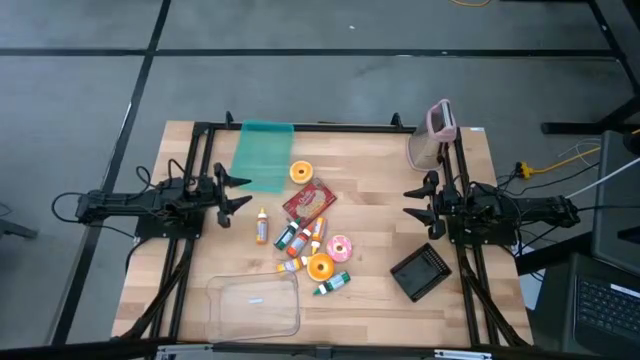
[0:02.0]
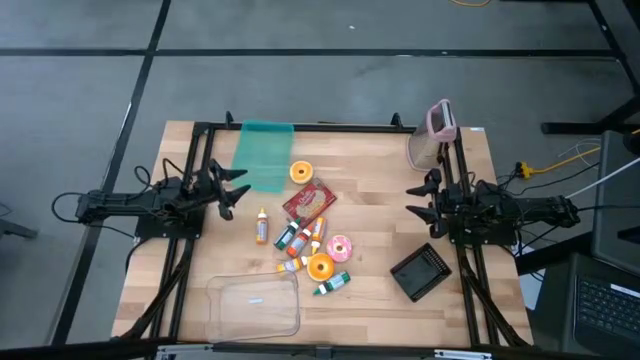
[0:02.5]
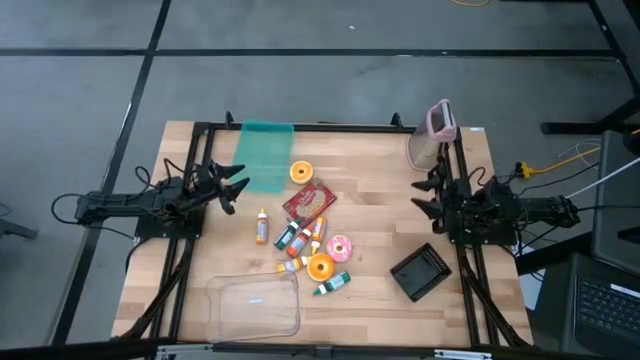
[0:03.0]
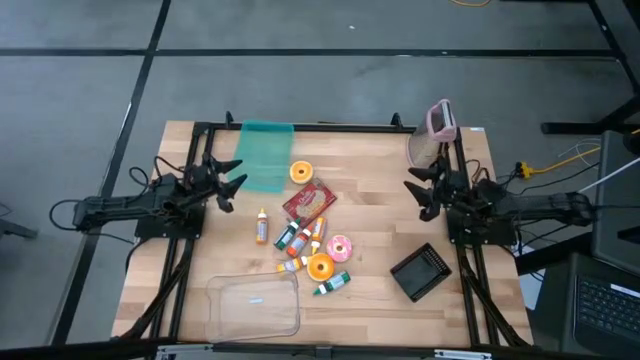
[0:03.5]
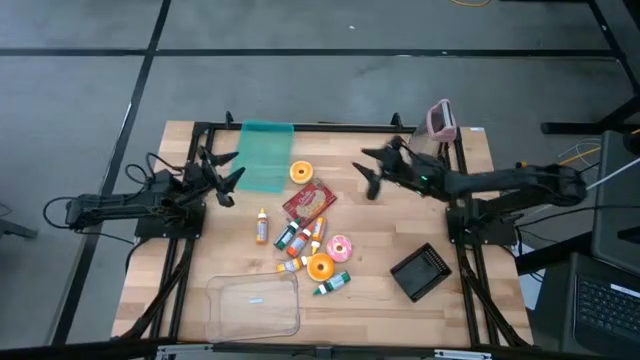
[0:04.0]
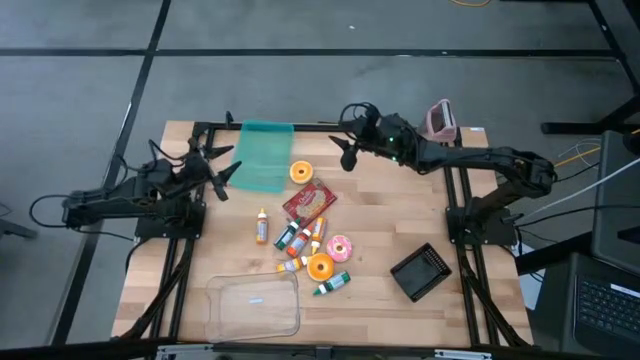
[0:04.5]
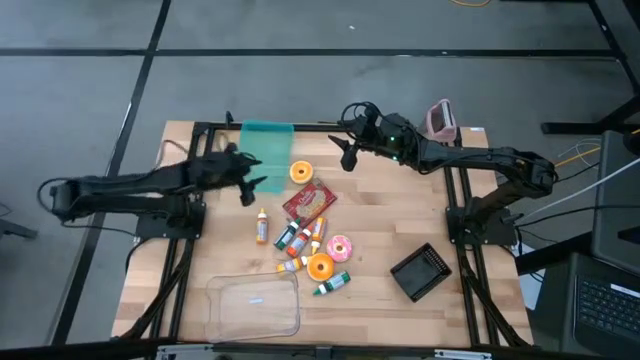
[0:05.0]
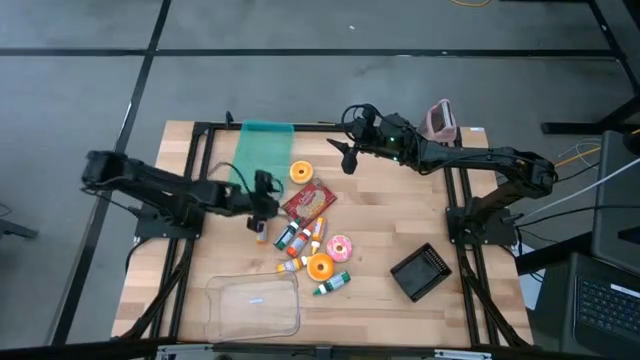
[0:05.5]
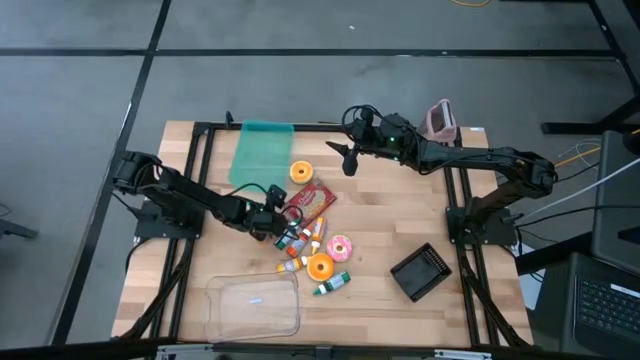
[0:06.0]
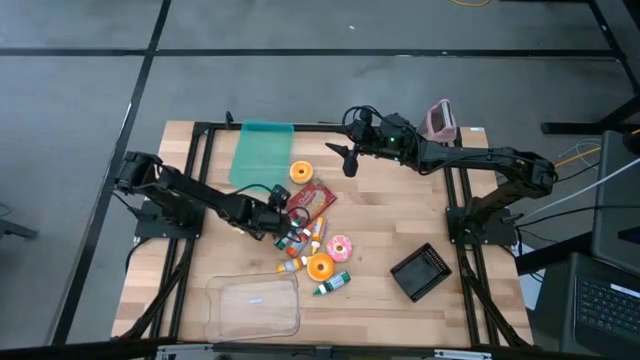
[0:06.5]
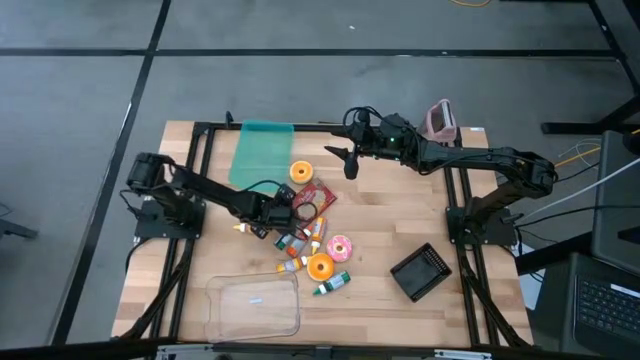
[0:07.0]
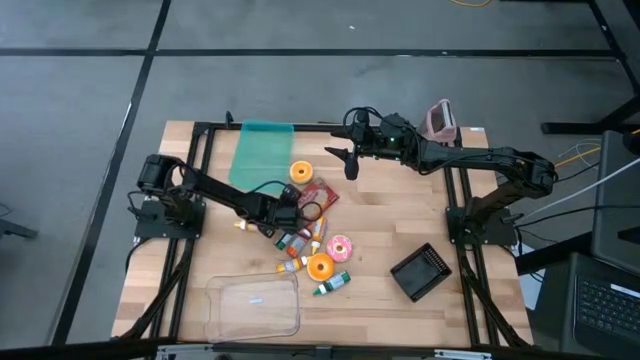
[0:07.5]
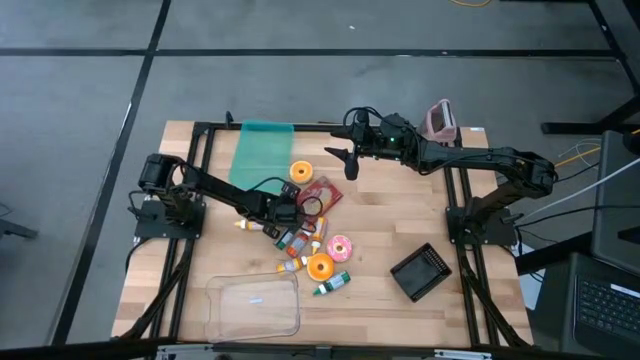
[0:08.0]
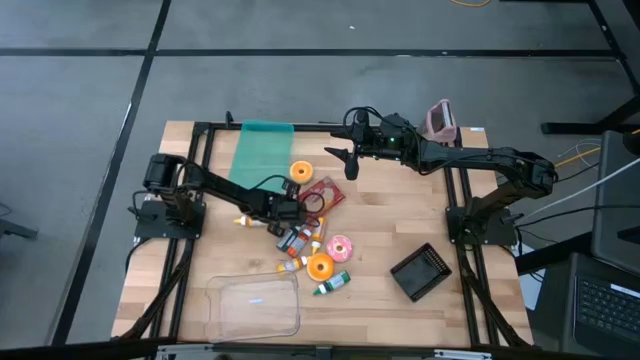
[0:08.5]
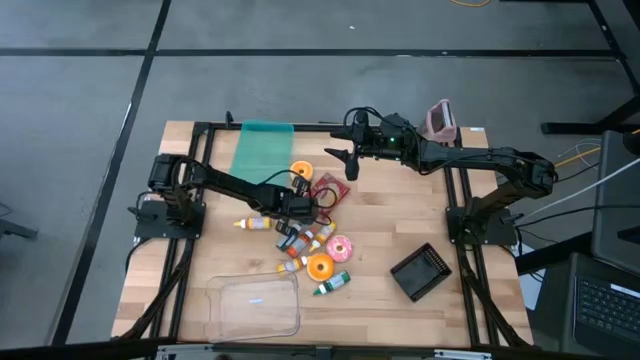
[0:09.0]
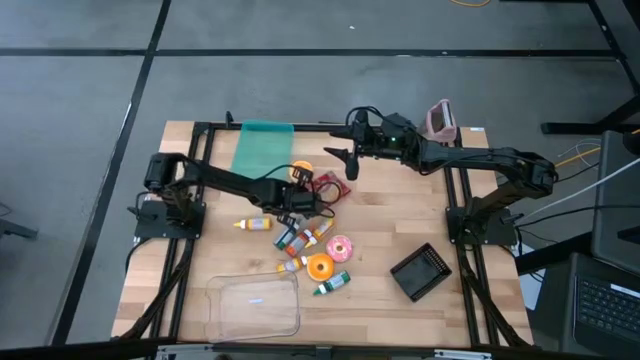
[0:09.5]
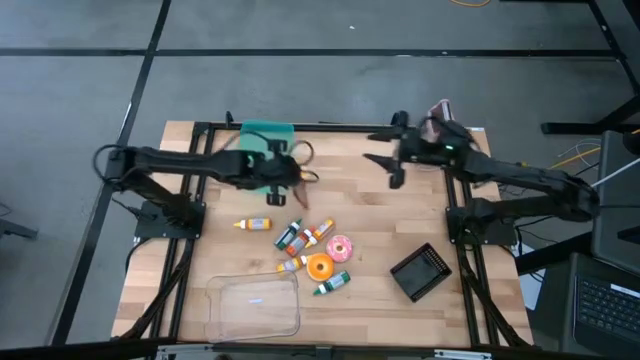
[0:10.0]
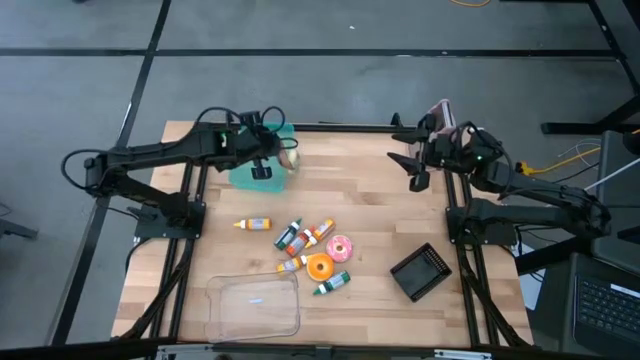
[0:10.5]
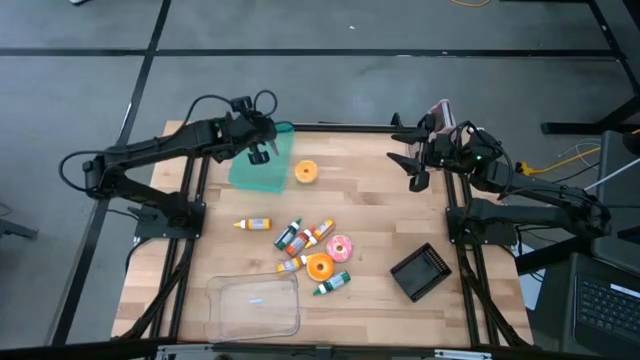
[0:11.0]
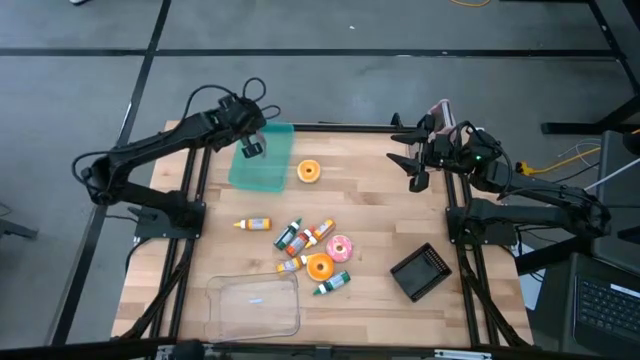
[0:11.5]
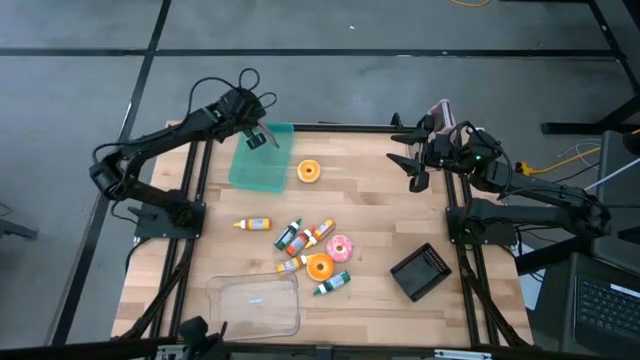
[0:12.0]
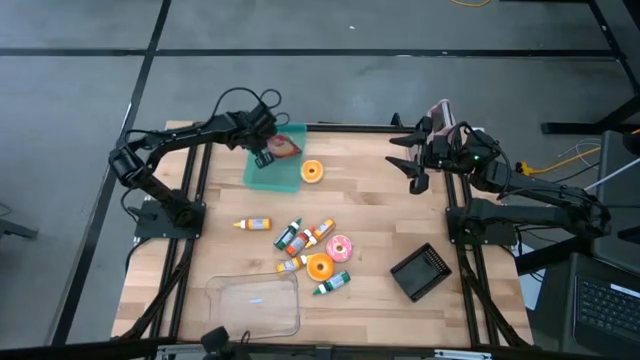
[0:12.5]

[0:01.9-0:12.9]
Put the popcorn pack into the blue bin

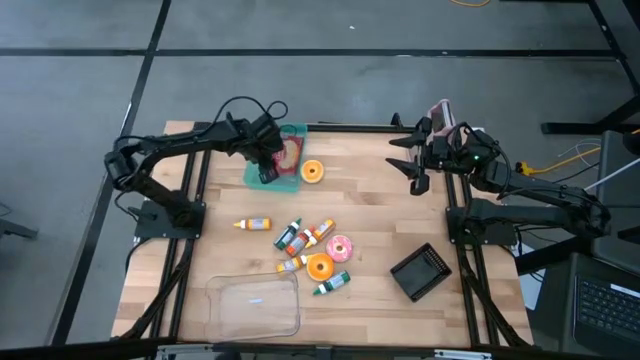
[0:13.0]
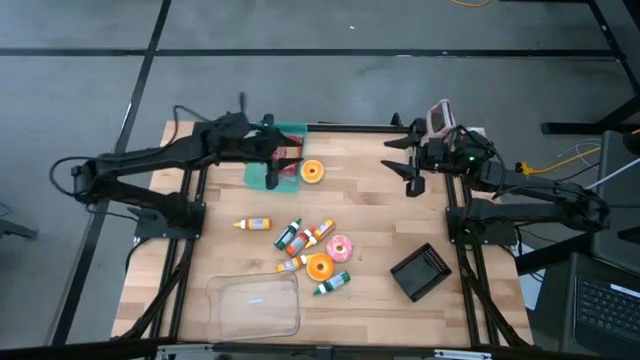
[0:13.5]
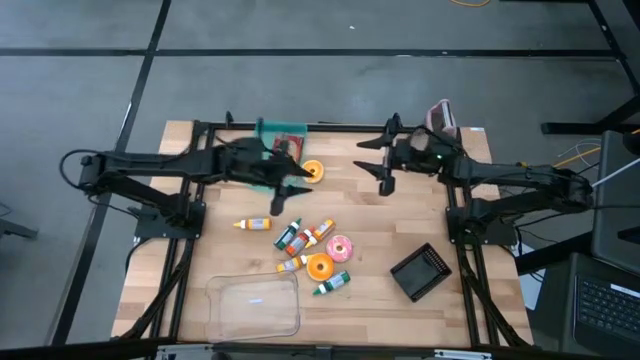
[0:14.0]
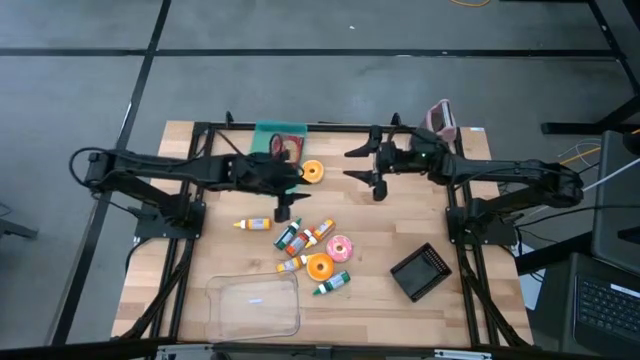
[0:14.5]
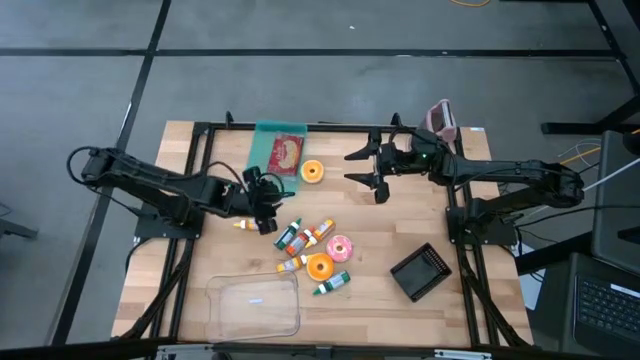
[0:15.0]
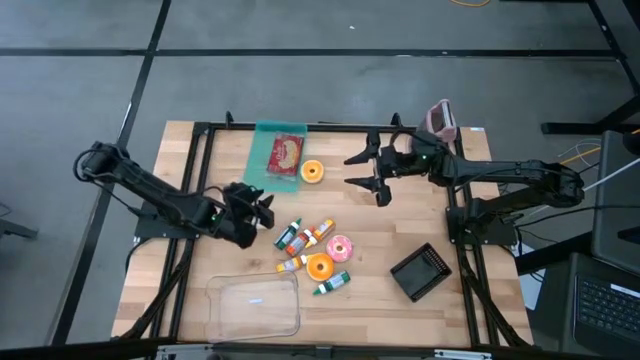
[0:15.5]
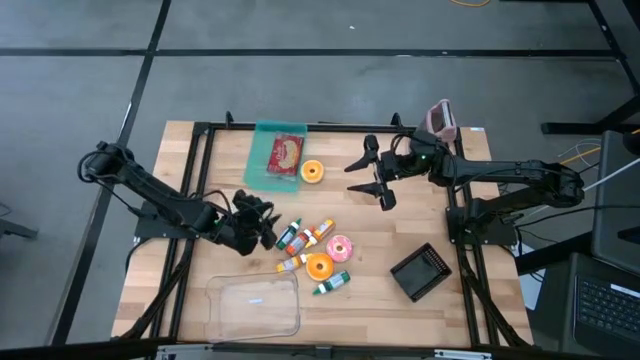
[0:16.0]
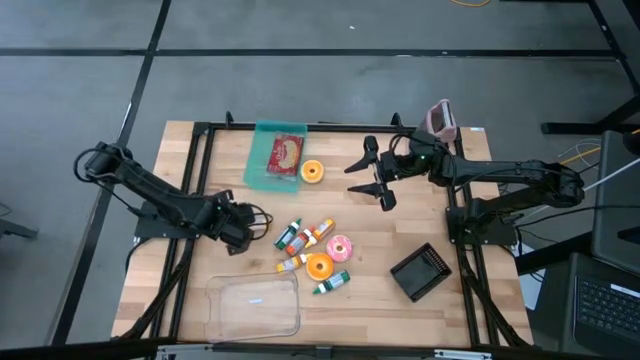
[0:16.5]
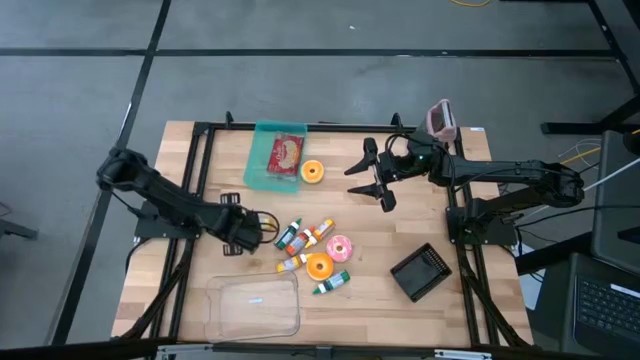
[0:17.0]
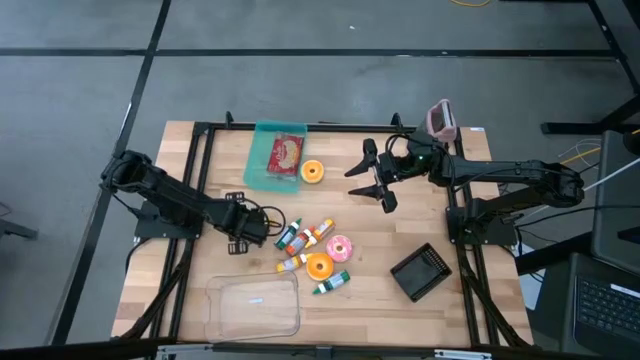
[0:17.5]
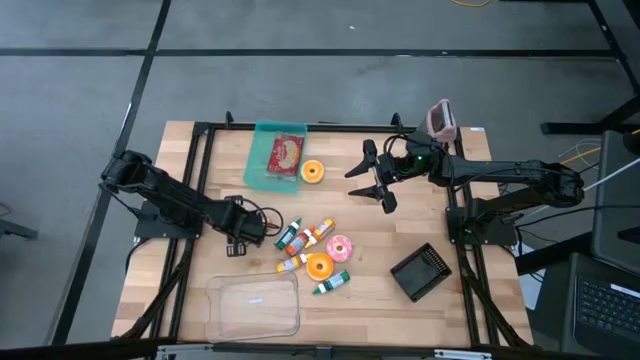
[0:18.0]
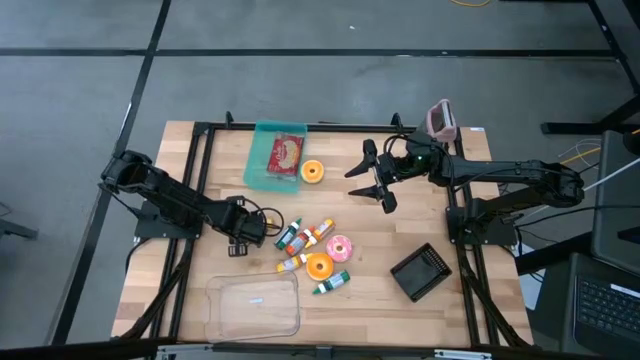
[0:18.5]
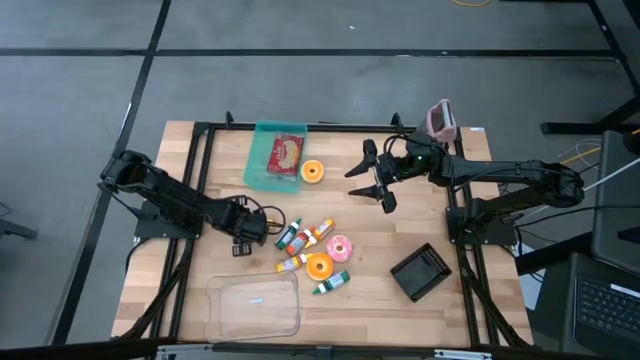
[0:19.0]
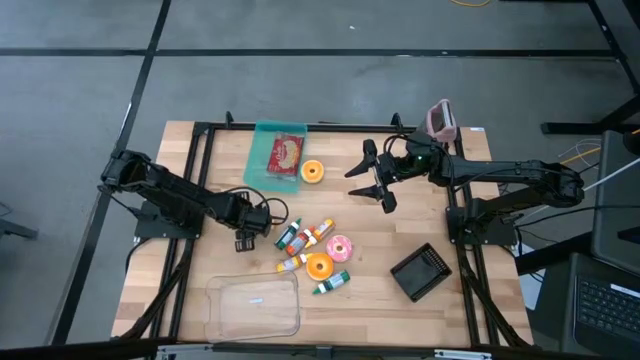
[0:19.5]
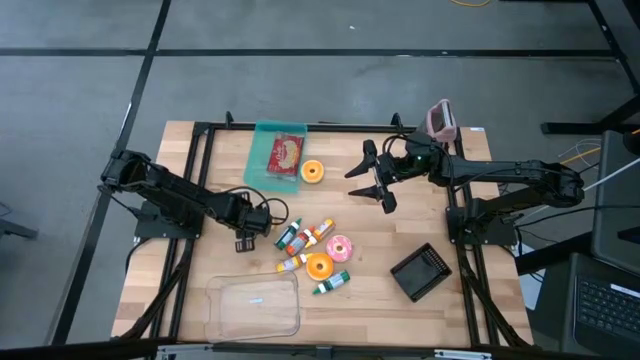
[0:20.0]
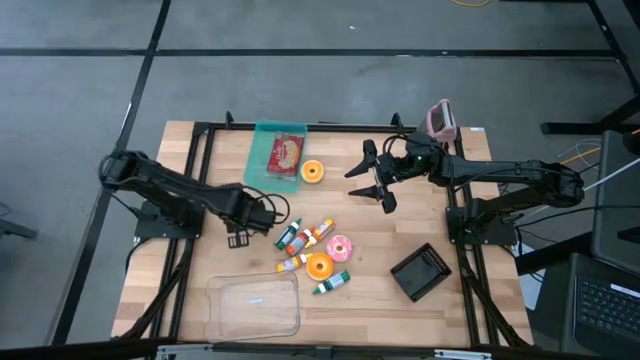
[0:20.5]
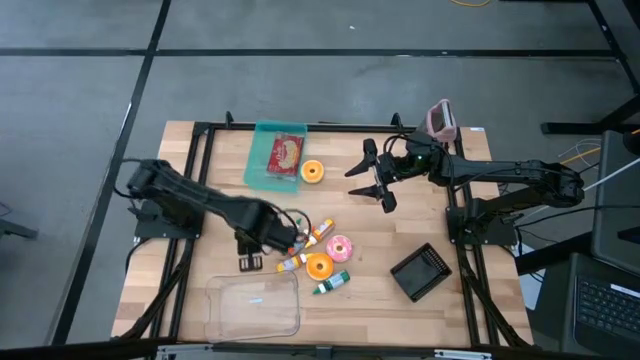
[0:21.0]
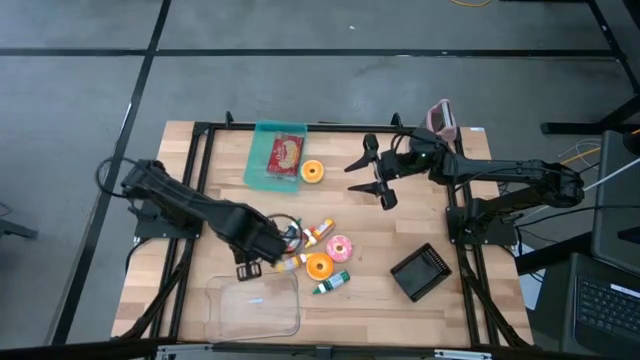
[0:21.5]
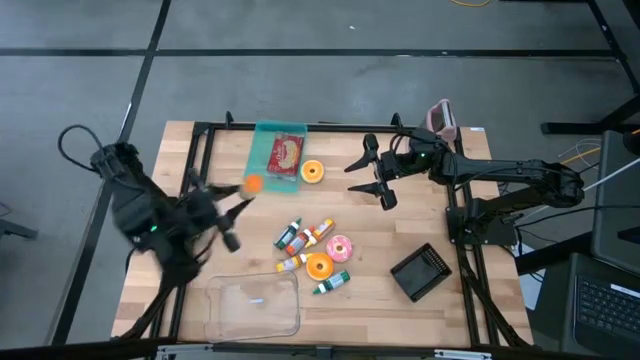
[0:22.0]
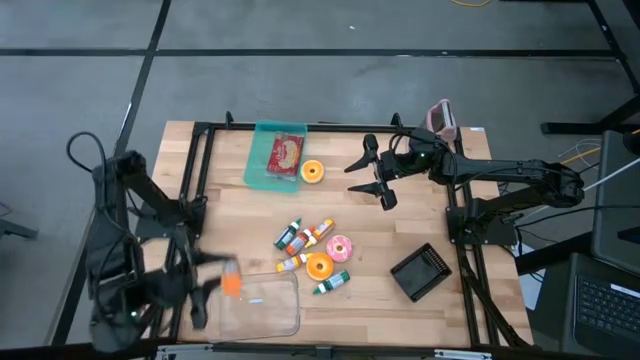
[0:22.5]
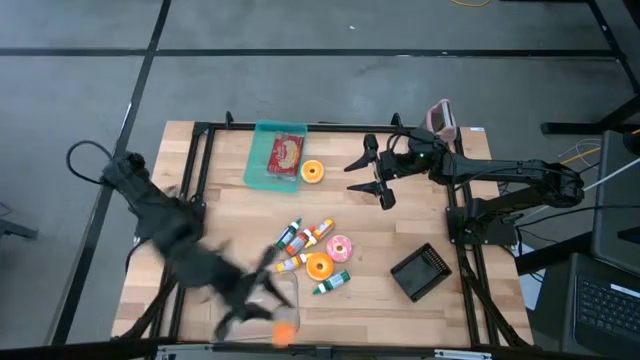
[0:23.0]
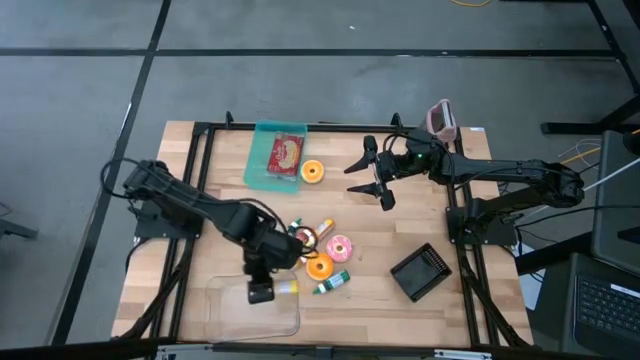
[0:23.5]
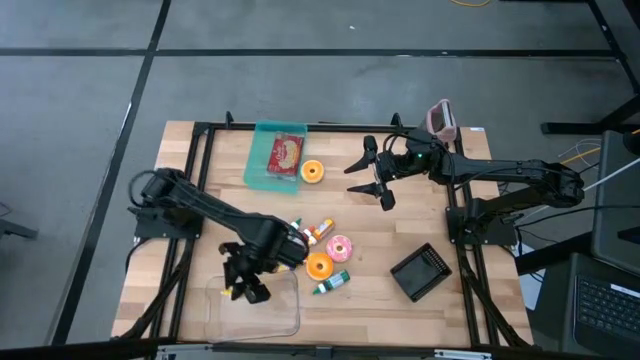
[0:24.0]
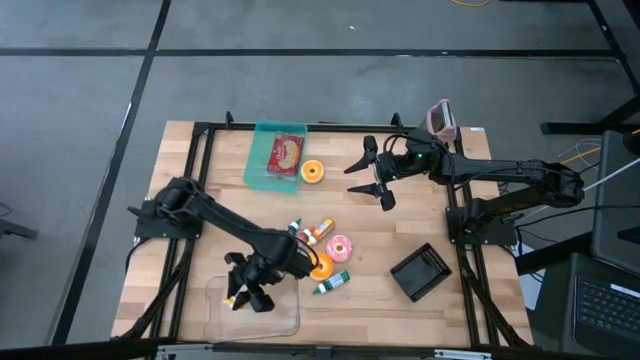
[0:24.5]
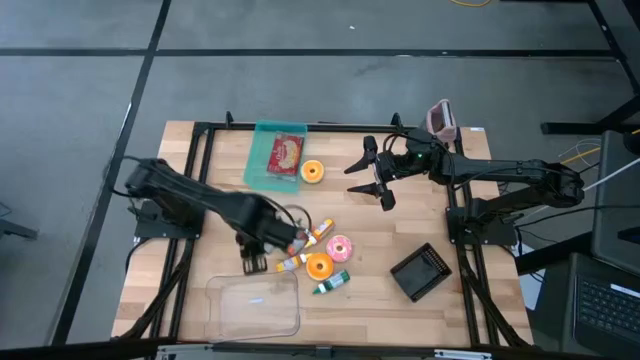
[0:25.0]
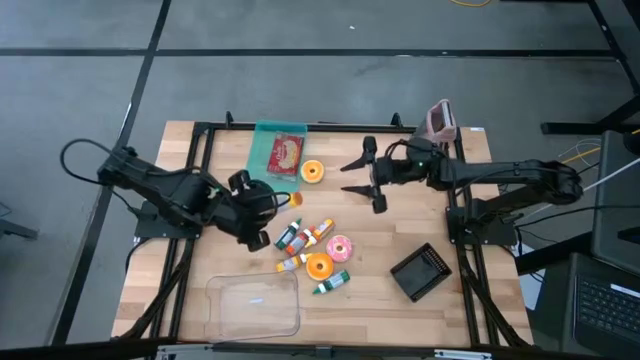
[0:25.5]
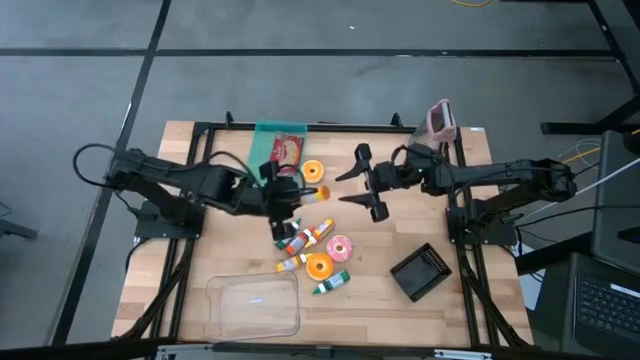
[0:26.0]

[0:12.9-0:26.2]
Put the top left yellow food coloring bottle into the transparent bin
